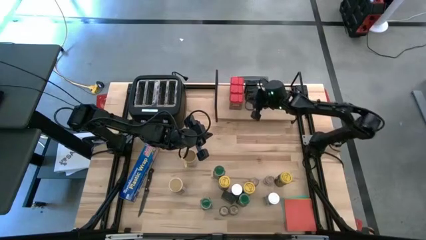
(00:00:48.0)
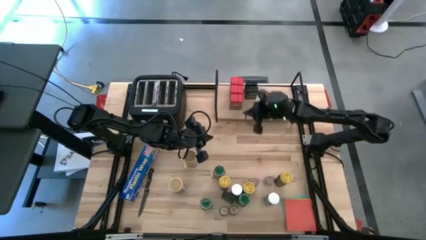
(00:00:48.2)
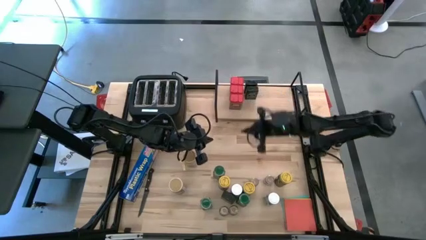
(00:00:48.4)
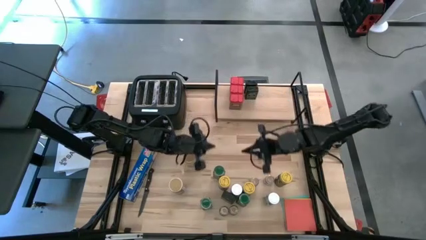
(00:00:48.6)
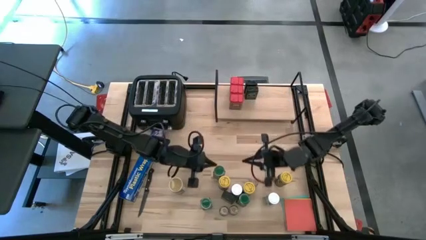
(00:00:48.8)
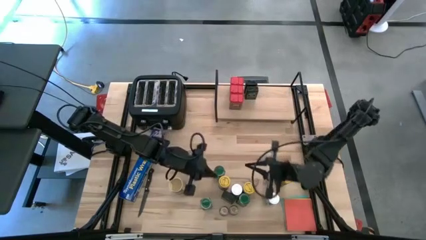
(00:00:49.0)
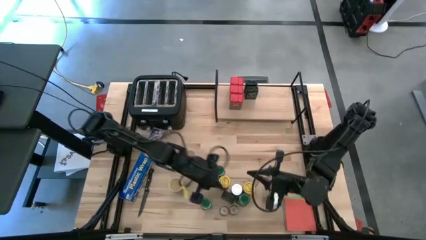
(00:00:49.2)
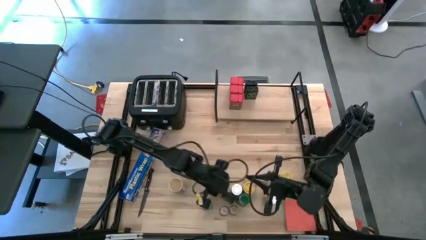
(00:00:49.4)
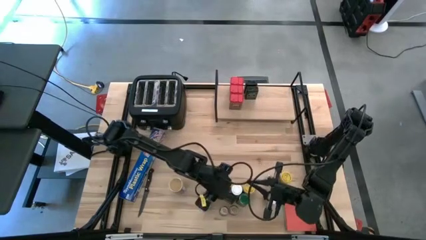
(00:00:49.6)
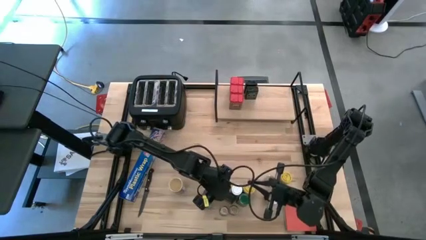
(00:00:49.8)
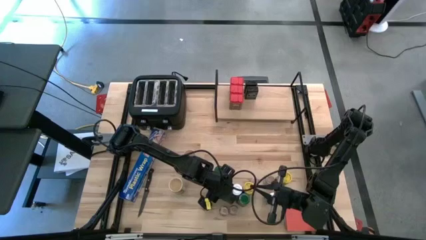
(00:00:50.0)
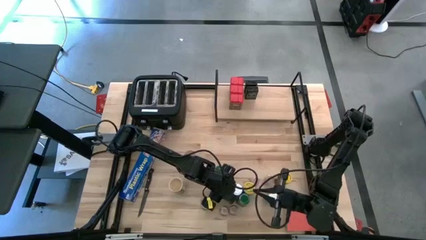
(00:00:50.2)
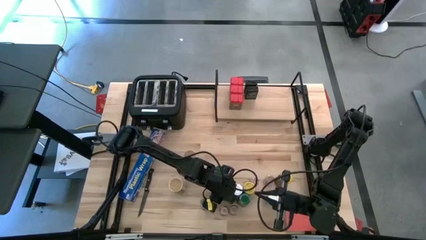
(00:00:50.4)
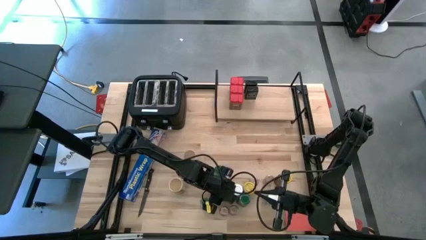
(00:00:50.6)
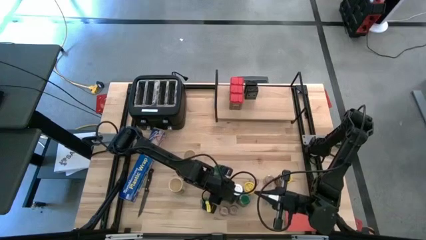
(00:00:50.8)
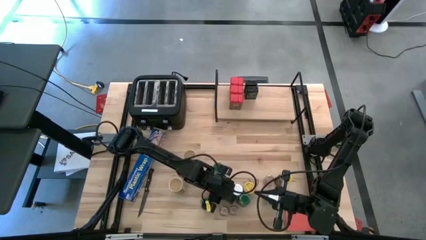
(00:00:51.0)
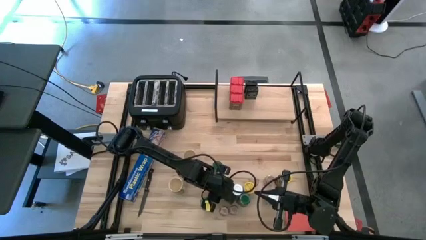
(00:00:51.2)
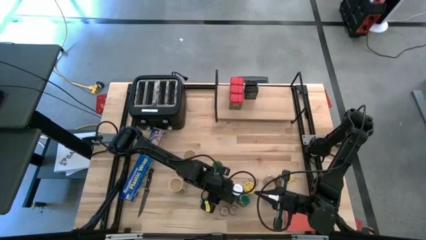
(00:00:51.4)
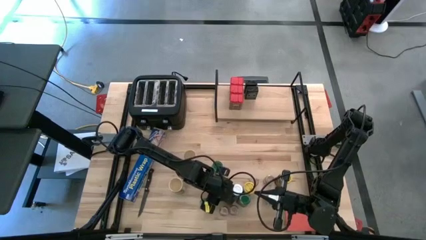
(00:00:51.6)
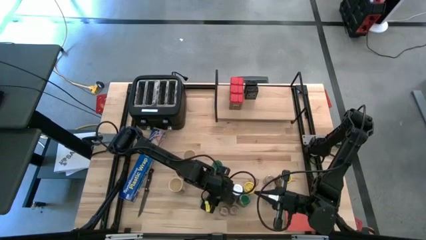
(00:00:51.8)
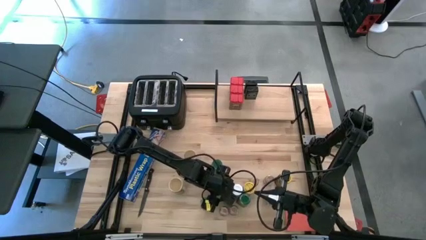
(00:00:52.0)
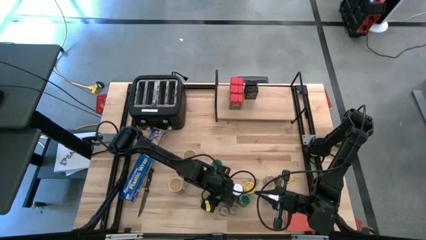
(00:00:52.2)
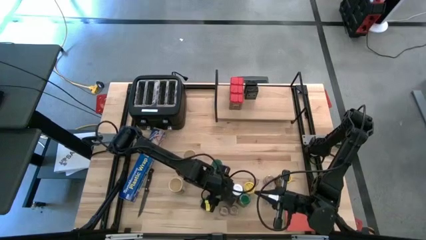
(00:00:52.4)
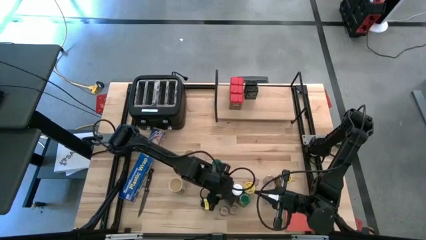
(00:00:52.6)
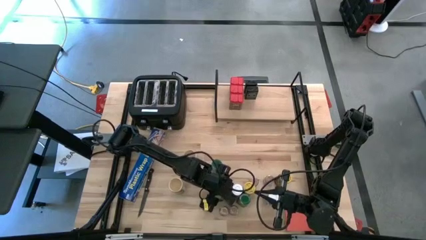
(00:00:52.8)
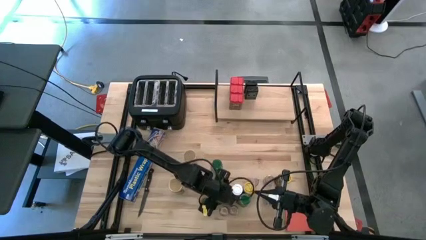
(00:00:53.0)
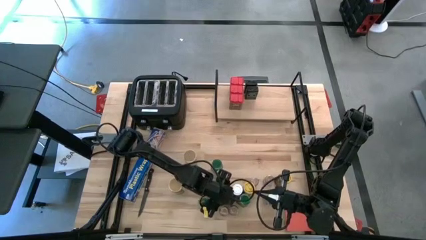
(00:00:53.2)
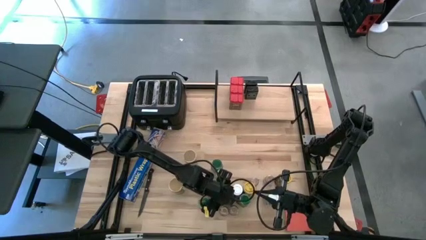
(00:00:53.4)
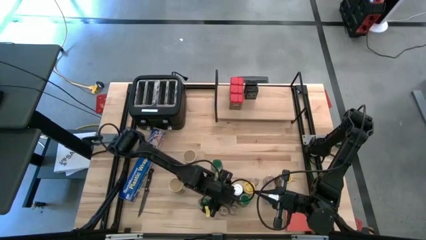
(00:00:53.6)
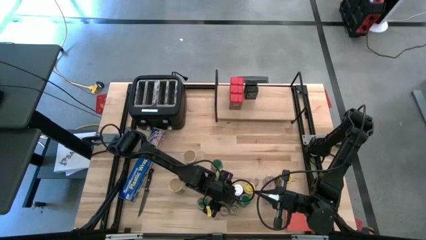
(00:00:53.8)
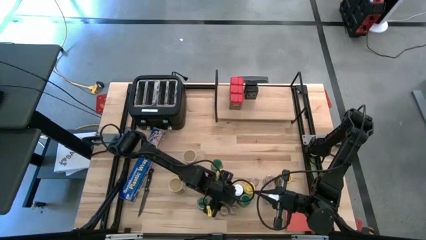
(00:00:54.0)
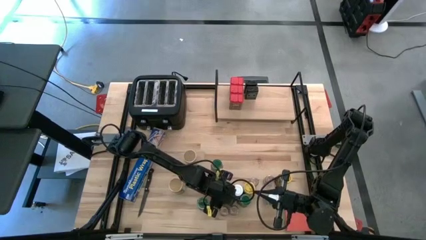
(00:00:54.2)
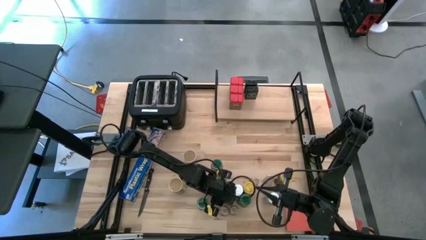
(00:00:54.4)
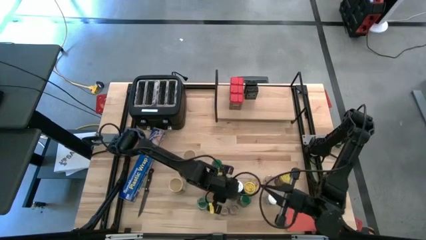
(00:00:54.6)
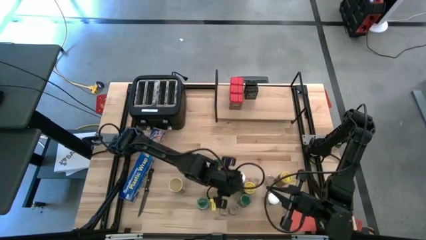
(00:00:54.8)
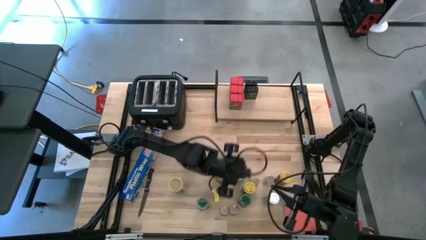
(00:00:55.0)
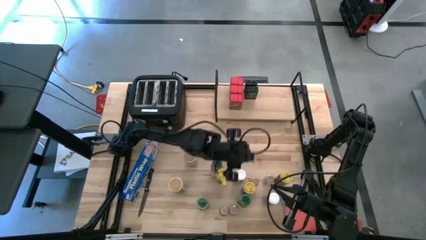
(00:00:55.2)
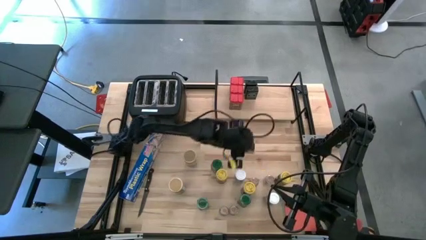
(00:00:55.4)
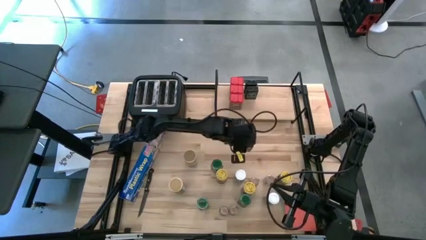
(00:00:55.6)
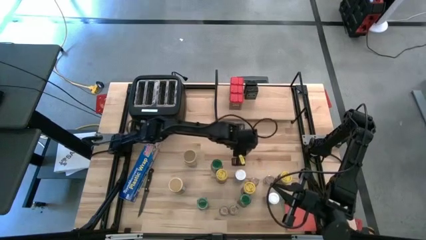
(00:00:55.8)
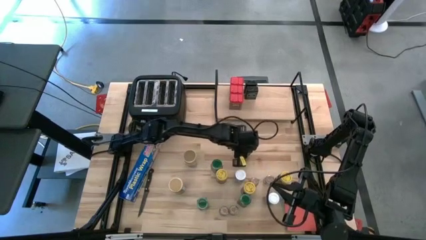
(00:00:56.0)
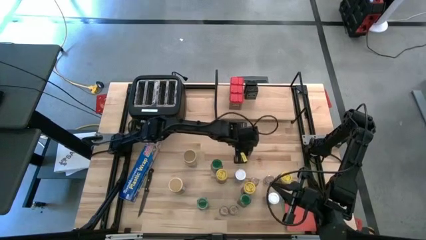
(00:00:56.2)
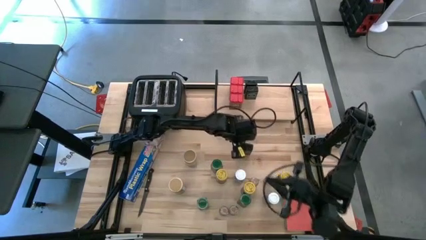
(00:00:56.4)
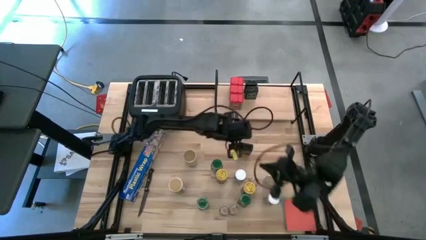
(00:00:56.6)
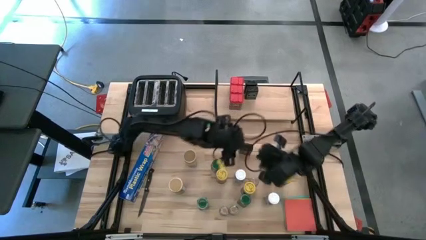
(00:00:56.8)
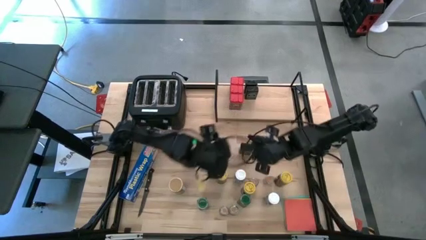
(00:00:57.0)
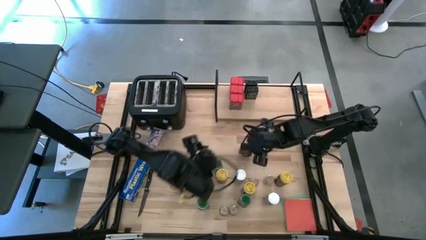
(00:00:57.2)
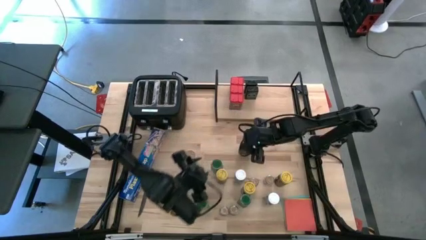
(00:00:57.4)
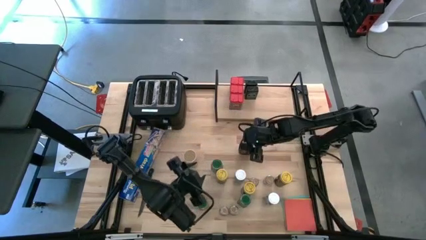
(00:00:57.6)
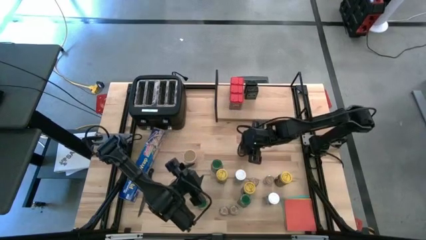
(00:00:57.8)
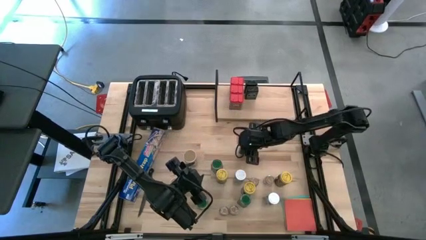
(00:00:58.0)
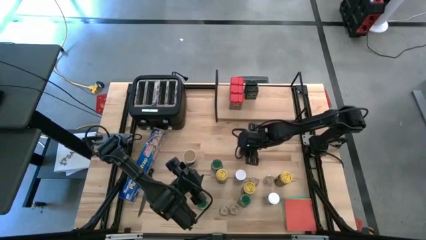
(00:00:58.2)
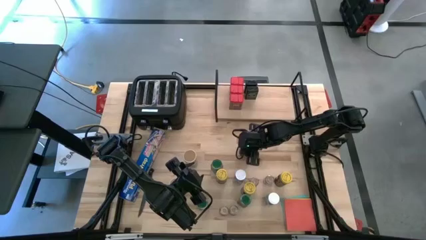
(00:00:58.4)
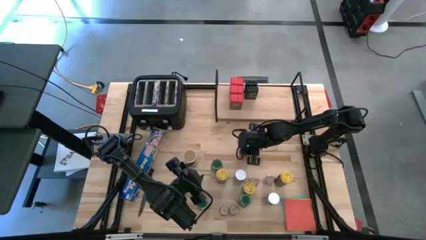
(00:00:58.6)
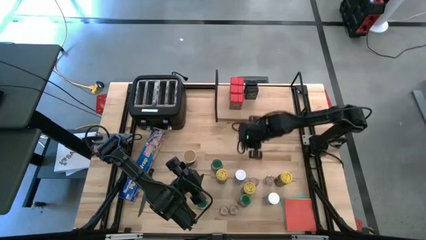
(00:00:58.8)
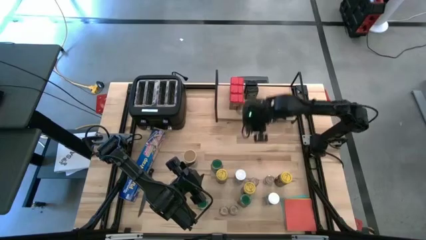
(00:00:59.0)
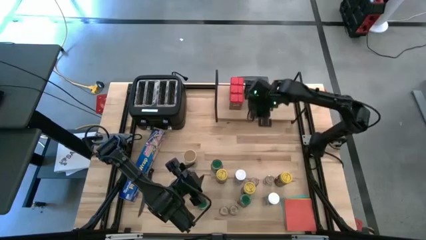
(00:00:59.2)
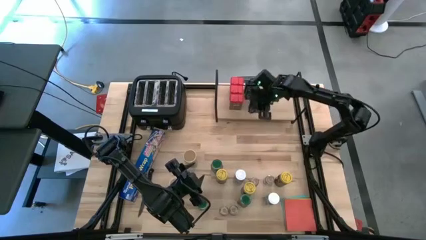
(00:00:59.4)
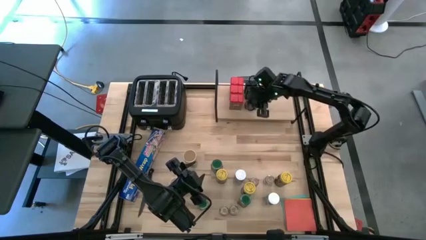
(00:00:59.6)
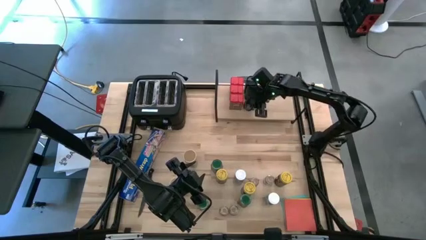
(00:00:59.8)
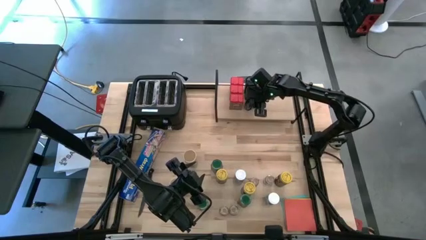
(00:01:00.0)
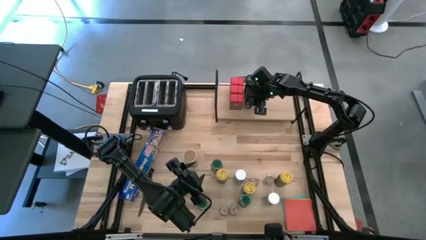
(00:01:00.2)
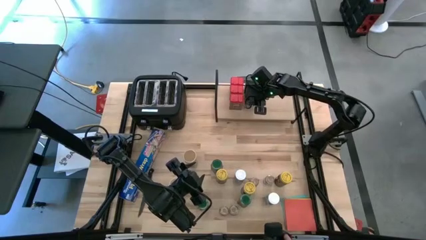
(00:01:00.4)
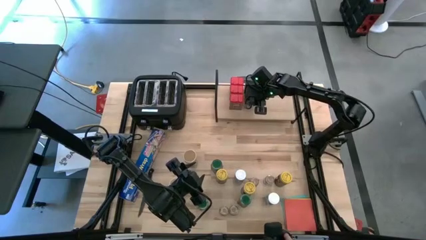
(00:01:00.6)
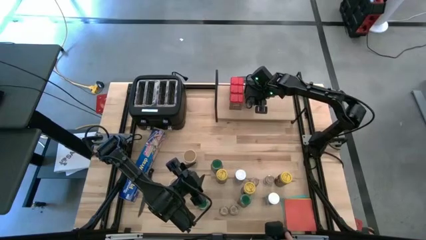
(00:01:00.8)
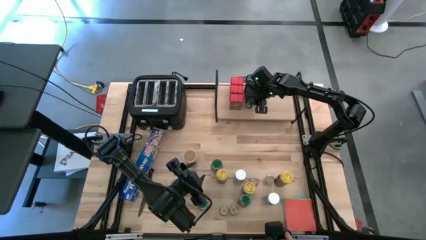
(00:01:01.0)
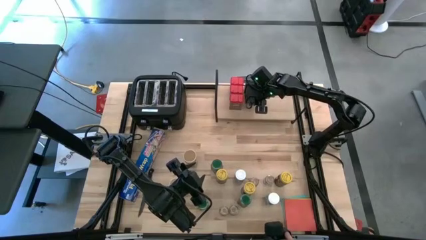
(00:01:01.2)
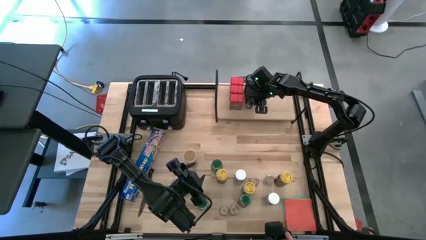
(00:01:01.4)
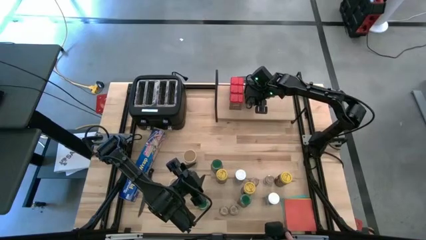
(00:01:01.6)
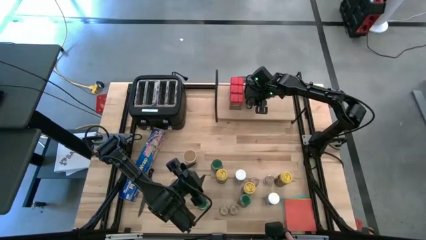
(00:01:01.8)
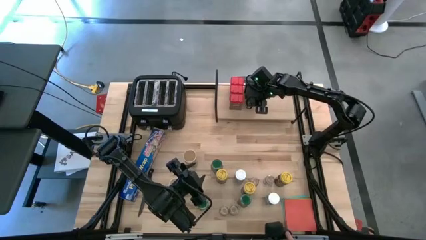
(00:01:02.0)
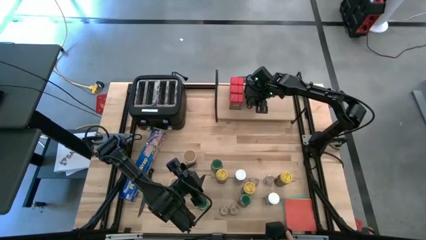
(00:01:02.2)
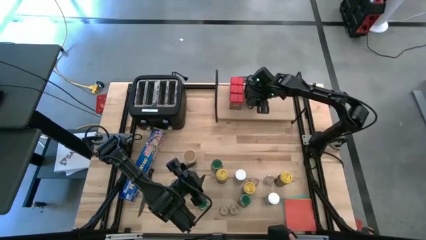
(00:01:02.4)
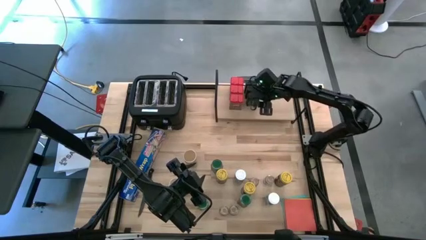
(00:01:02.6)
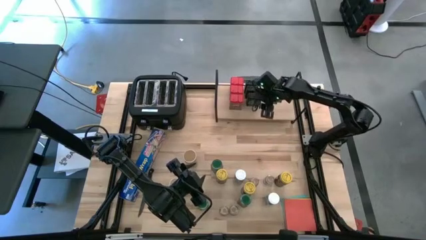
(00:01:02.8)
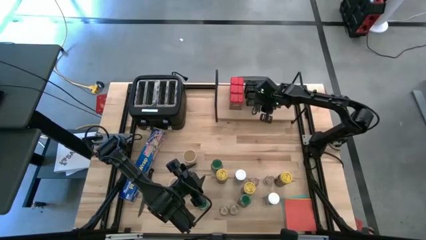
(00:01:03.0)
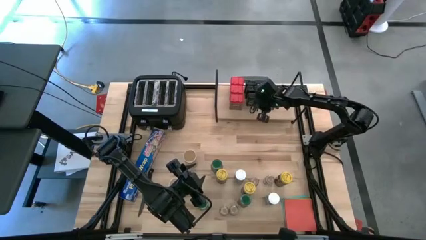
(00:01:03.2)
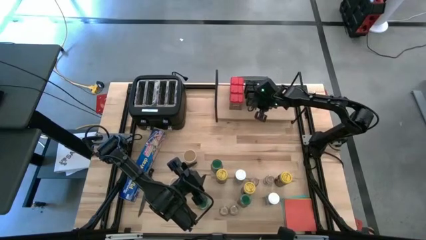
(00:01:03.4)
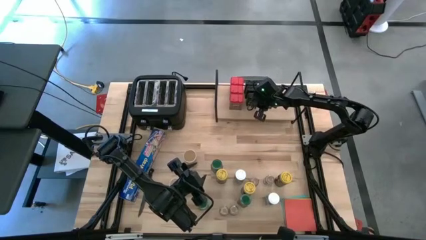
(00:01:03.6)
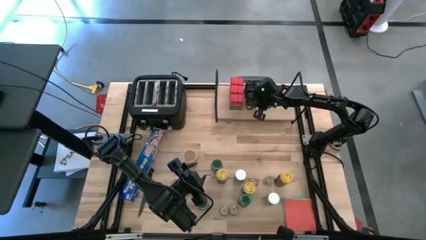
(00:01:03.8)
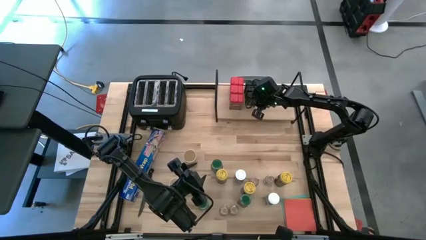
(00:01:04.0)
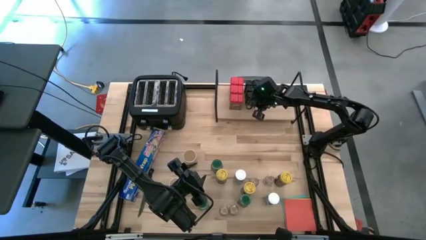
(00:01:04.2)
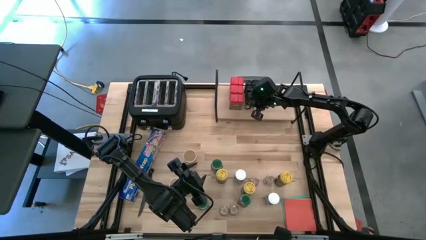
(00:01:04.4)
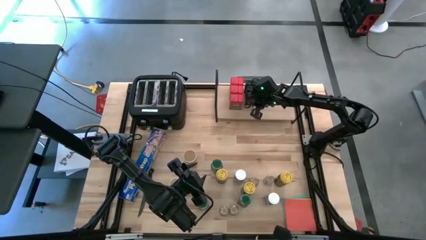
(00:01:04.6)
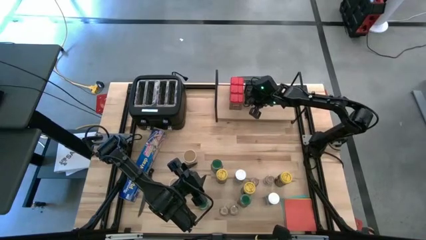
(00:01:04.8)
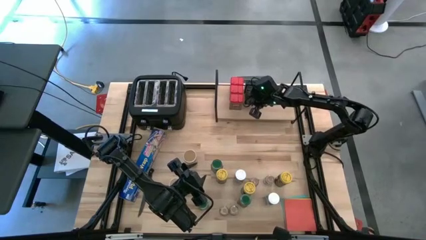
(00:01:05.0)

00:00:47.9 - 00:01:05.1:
Task: Shelf spices
Put the black seasoning can on the shelf aligned with the other black seasoning can
